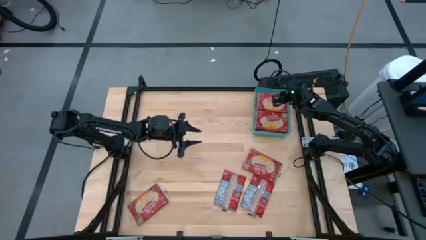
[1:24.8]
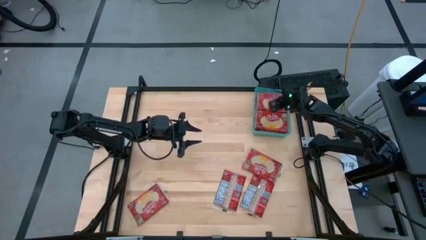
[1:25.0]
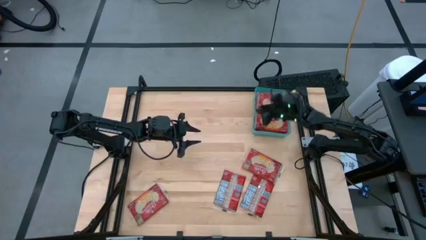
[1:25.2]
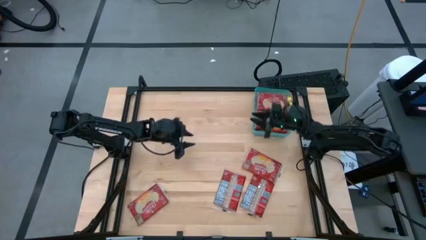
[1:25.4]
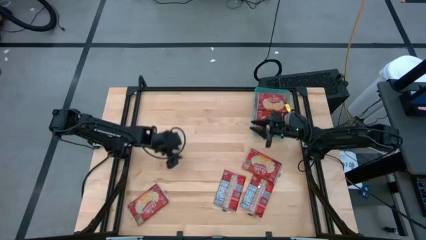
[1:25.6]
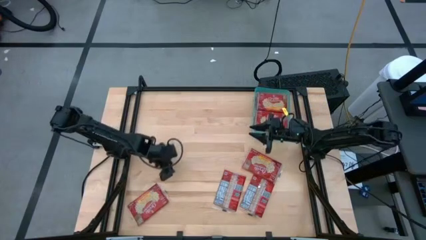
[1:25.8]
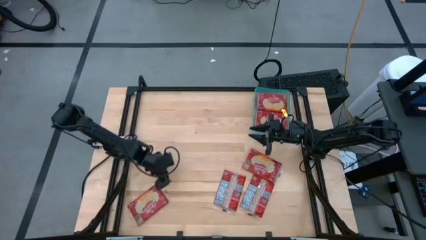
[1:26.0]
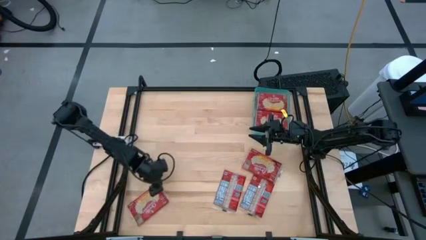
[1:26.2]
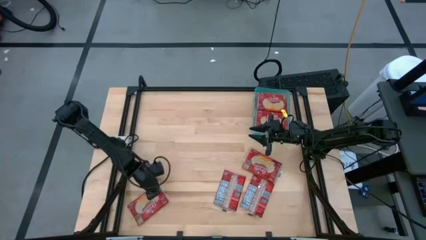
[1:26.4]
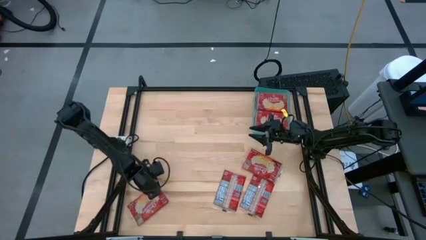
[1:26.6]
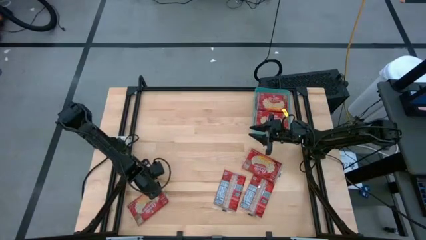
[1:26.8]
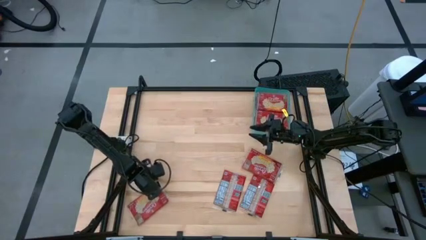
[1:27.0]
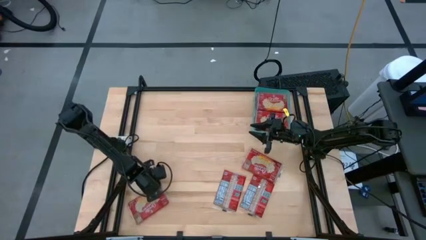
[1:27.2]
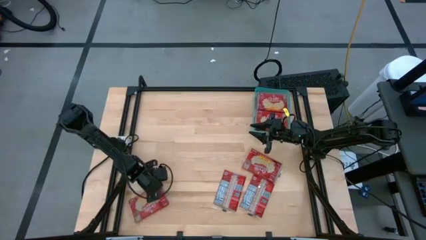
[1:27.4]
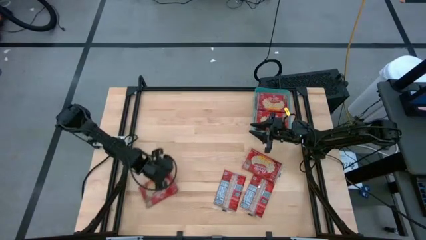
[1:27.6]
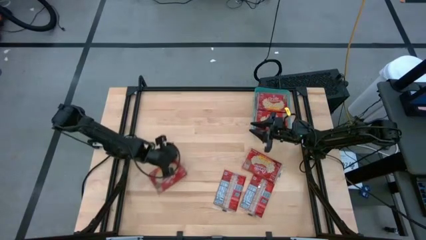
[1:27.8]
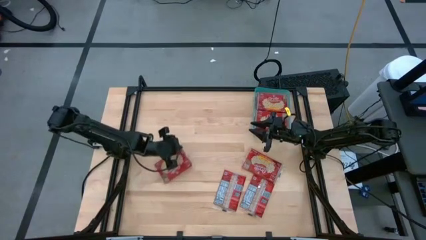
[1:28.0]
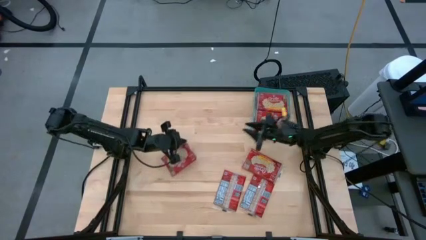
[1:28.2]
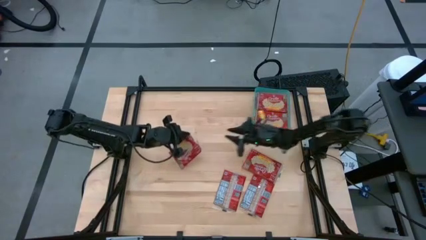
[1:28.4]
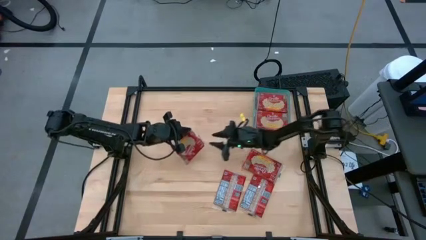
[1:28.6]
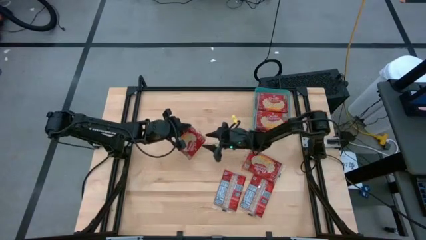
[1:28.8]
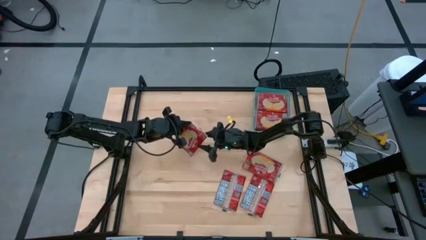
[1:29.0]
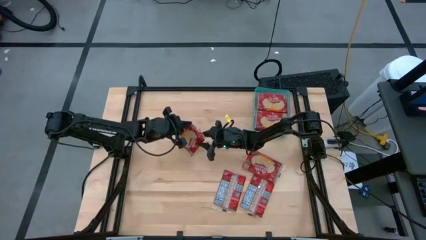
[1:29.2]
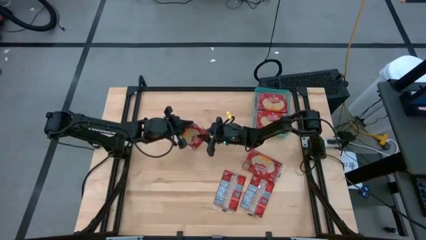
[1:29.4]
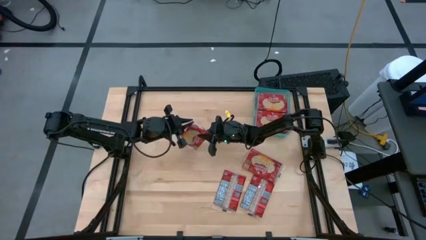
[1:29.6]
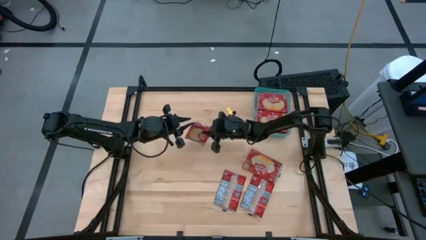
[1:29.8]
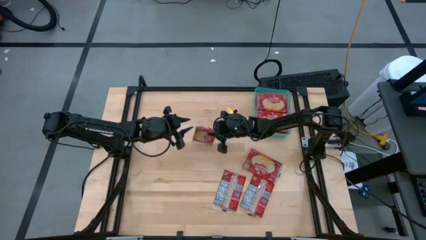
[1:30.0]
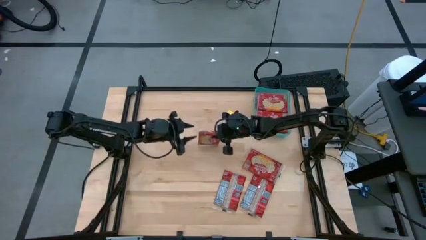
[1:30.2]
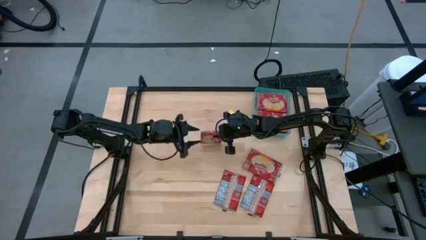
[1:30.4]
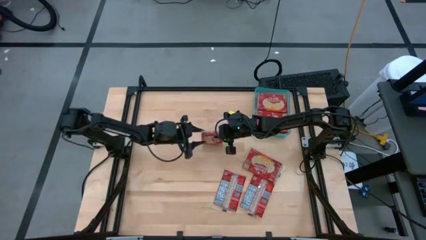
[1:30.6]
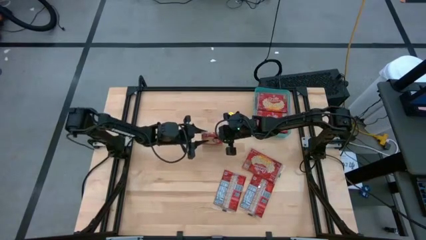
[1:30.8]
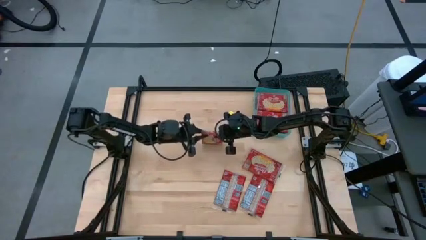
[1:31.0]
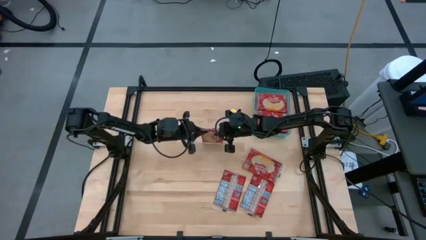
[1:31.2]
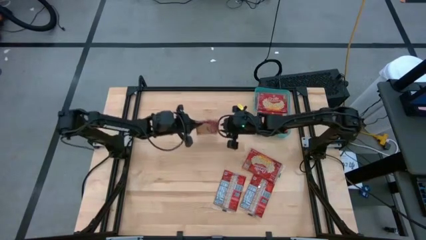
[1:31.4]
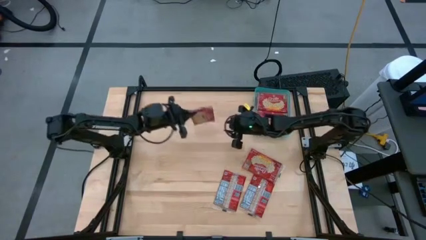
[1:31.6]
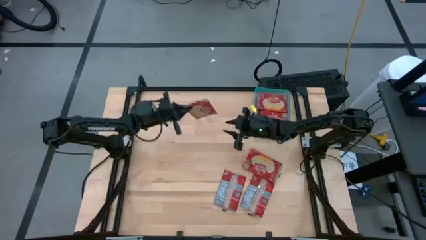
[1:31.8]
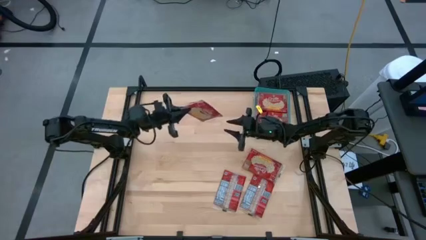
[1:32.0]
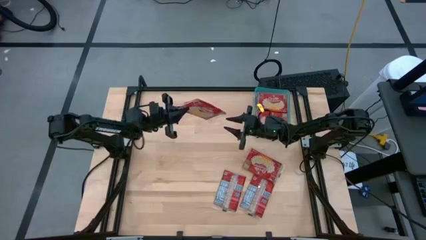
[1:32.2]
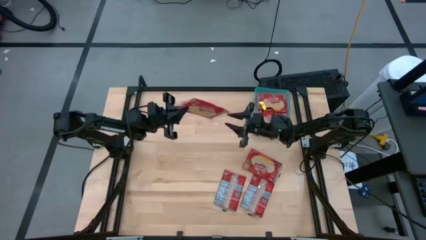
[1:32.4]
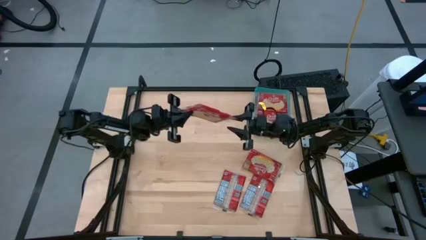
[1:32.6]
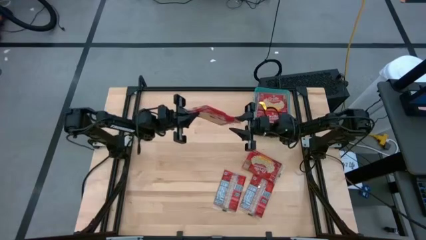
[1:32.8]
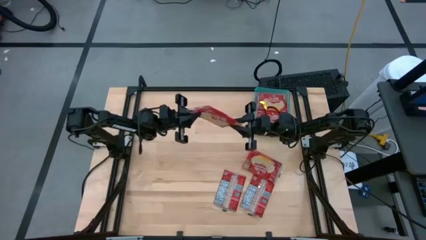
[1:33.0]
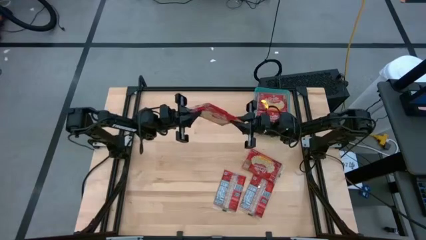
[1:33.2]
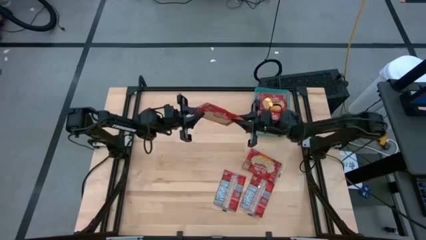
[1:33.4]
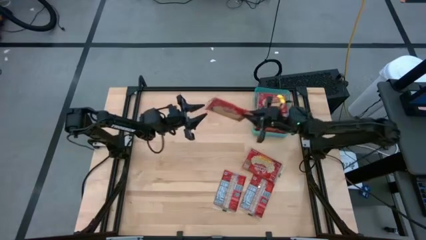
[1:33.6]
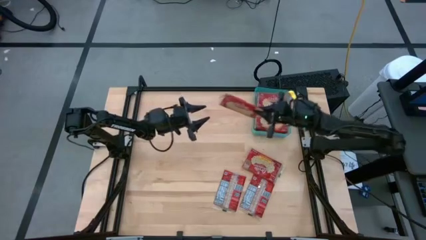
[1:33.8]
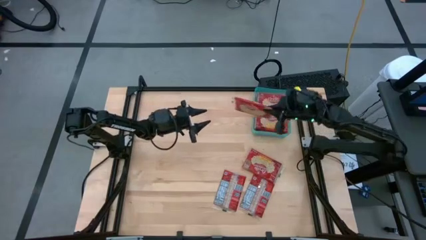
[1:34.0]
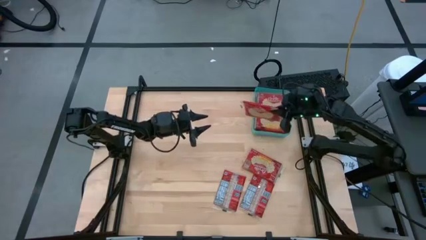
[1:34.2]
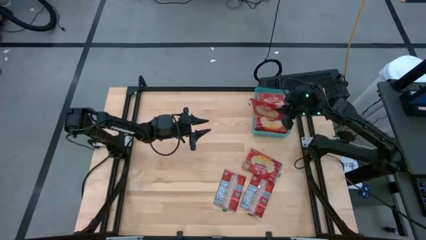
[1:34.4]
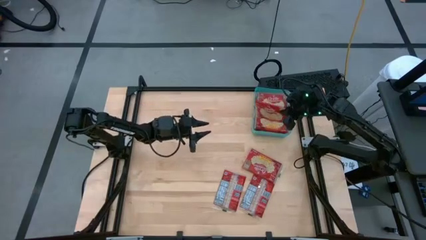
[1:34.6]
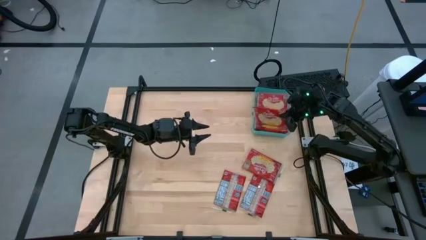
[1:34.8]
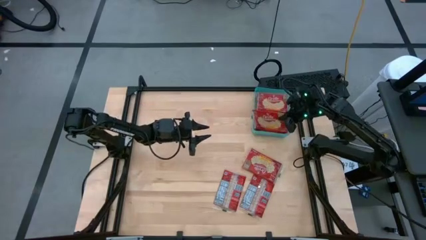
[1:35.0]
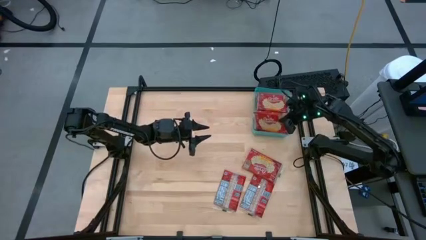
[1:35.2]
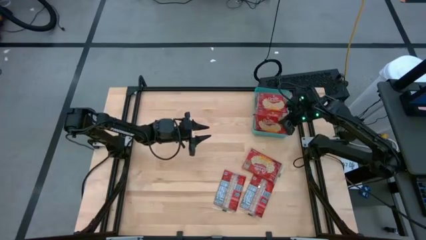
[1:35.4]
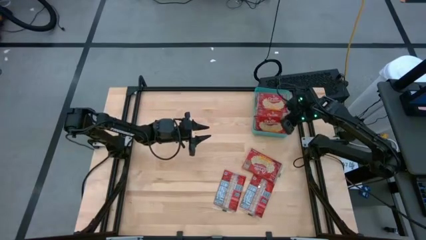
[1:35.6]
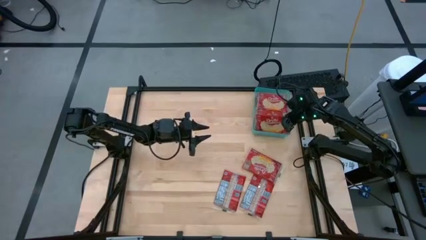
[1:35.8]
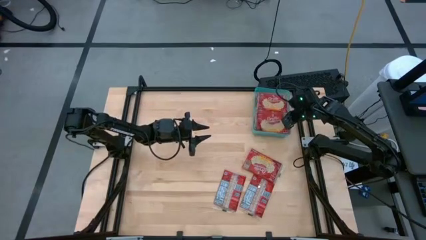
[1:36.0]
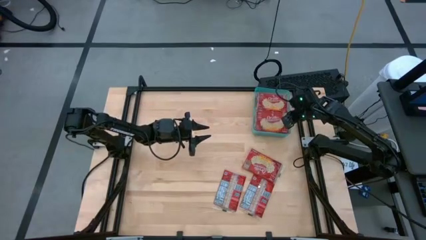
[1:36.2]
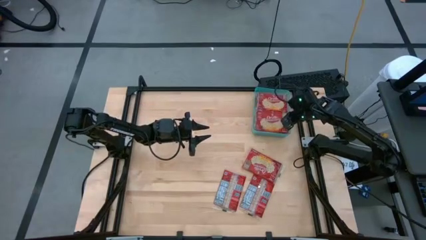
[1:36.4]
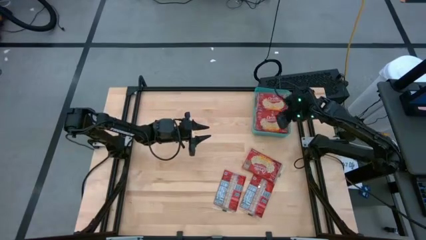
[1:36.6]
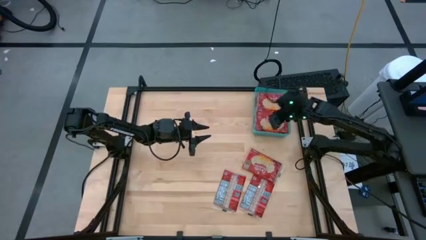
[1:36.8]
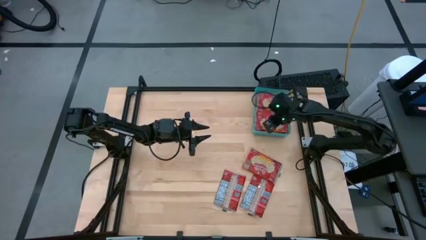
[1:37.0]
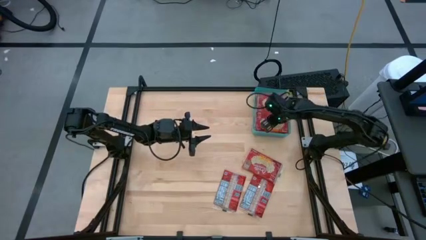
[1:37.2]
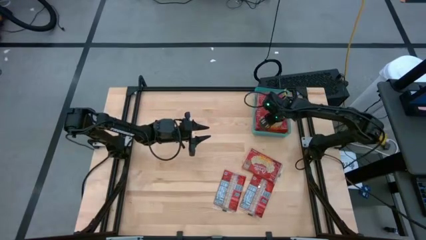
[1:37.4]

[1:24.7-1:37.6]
Task: Sort popcorn bags into baskets
Put the red popcorn bag into the green bin

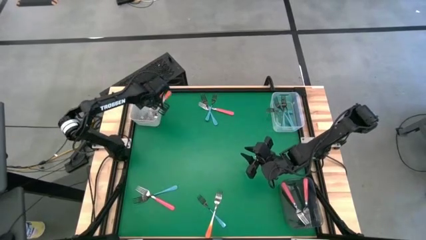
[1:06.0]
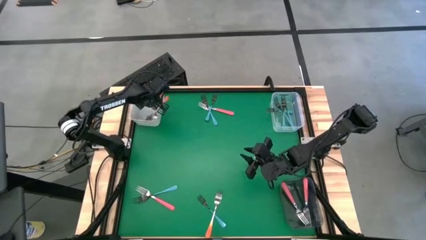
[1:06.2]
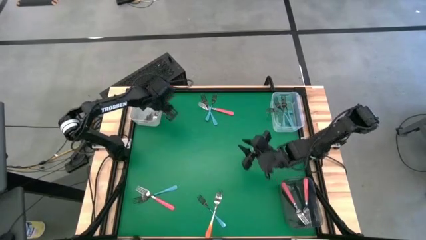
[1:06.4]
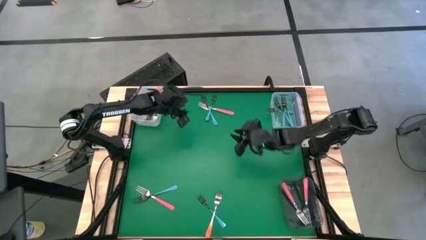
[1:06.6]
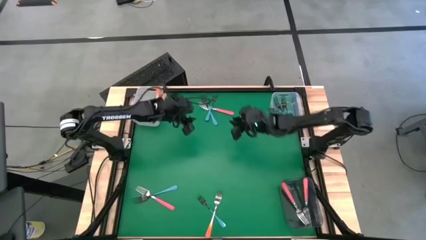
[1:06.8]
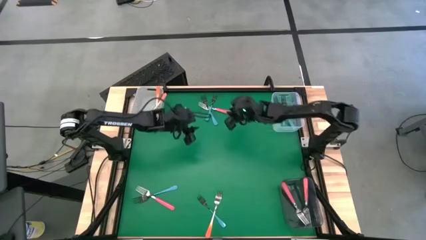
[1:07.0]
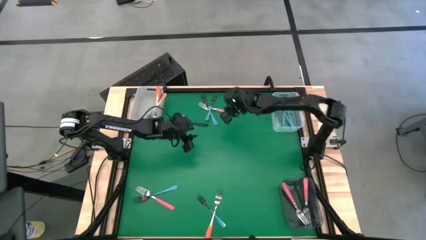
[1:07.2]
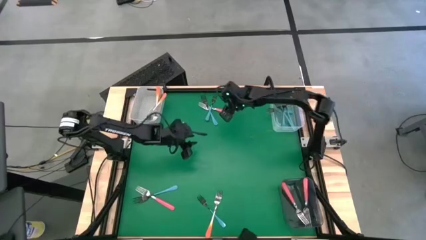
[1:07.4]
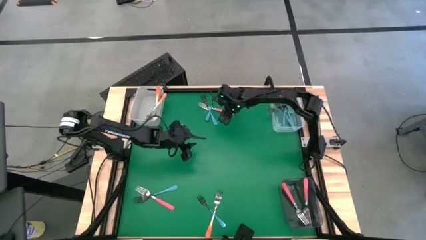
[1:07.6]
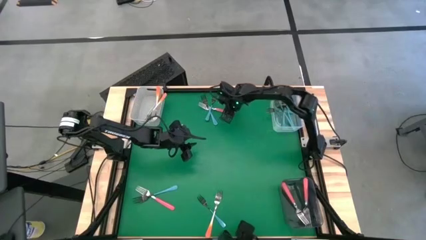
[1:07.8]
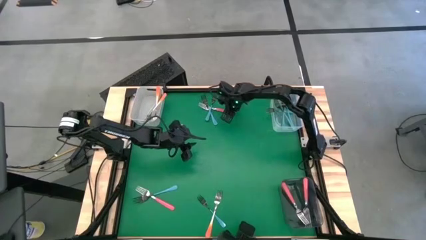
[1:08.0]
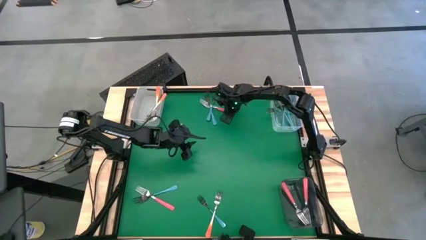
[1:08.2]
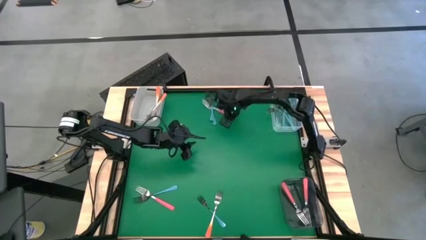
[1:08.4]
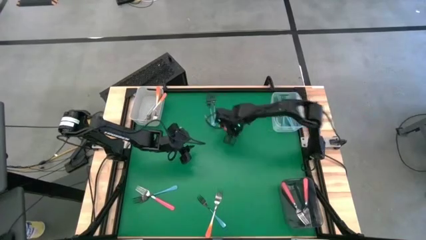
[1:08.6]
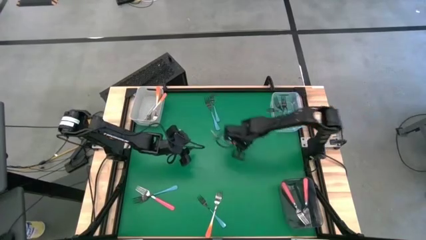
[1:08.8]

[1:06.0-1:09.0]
Task: Sort silverware by color (type)
Put the pink fork into the black bin

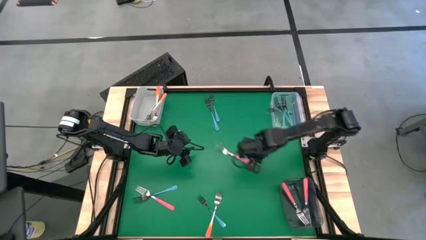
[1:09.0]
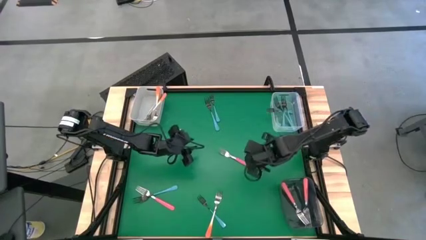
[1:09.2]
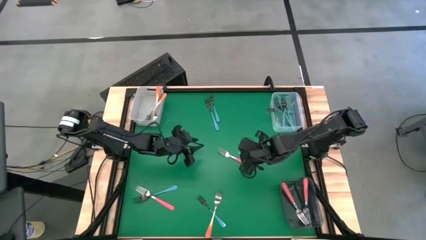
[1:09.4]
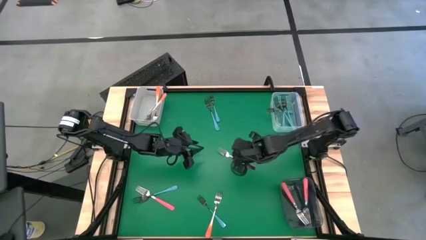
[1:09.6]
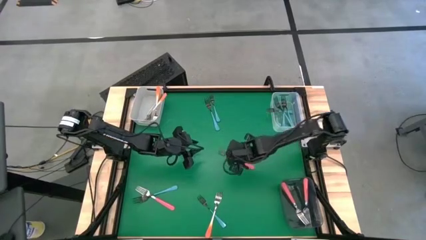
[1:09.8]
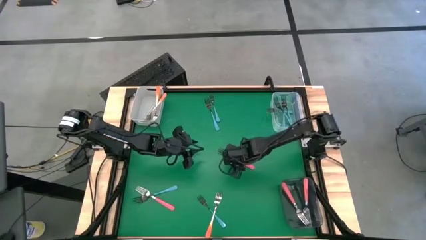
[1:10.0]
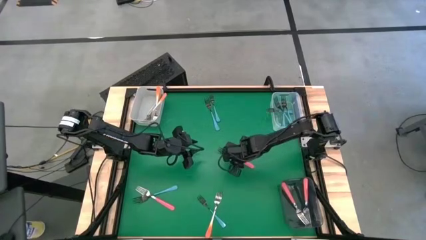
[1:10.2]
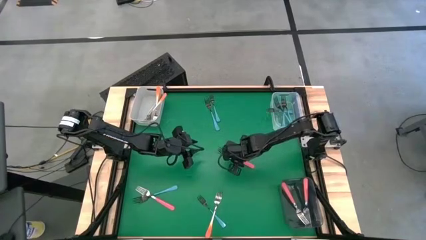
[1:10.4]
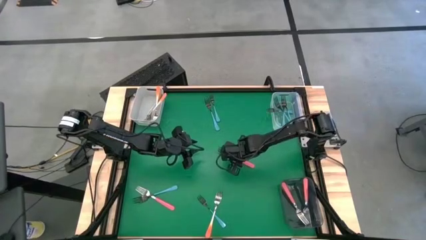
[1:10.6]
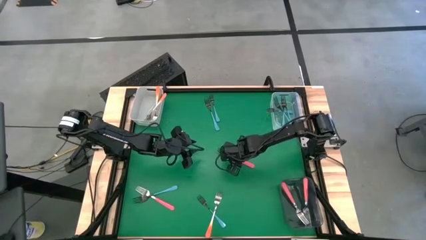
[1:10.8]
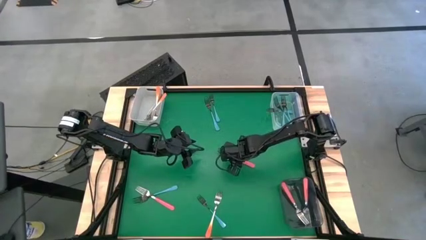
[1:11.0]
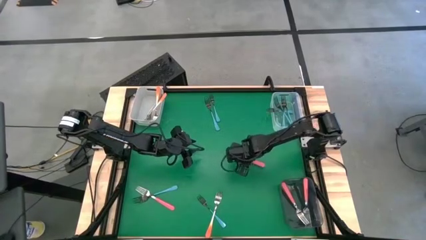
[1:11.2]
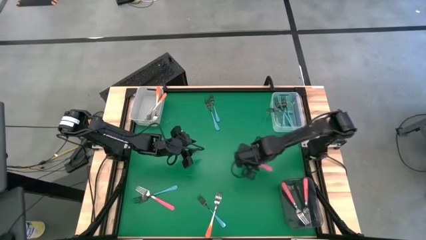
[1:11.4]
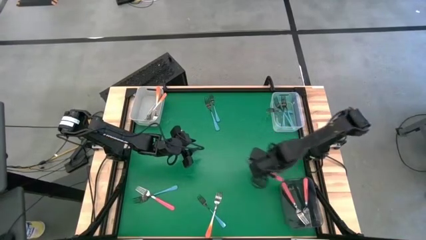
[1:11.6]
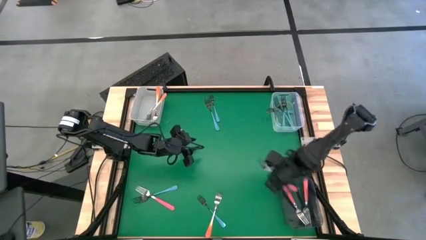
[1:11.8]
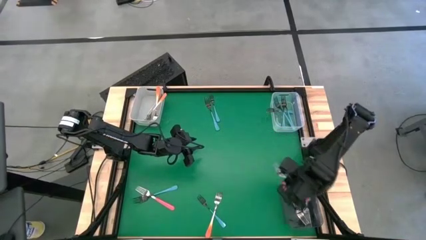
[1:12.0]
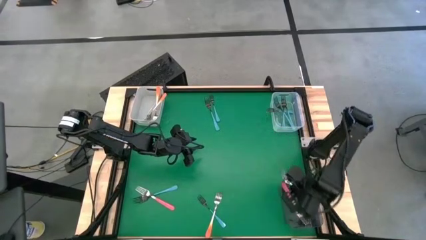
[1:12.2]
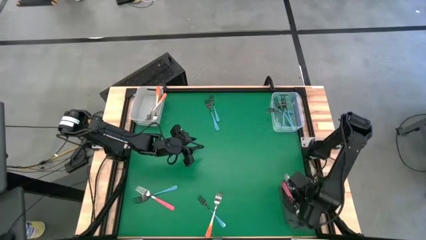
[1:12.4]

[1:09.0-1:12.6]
Put the pink fork into the black bin
